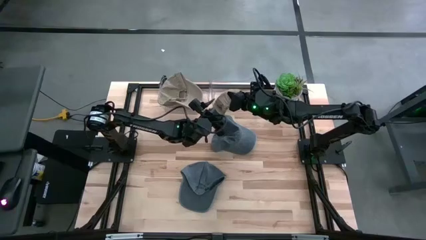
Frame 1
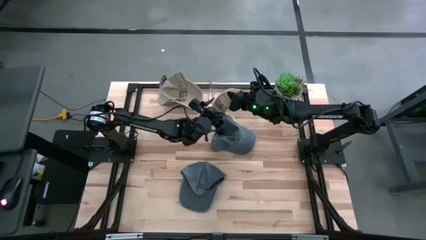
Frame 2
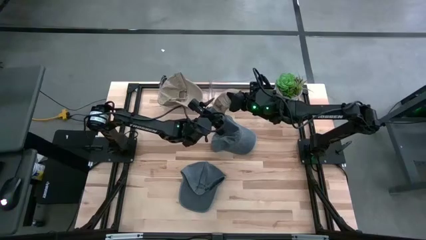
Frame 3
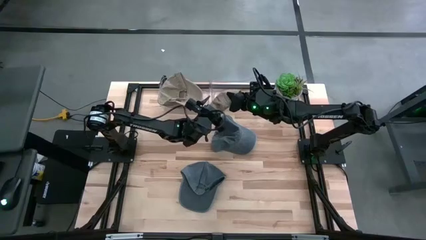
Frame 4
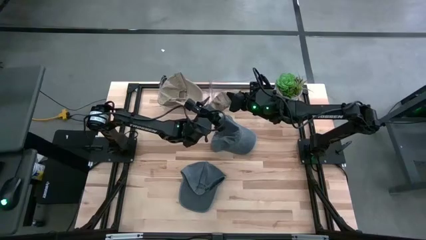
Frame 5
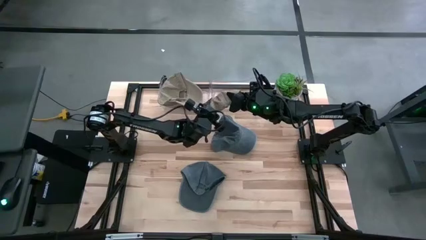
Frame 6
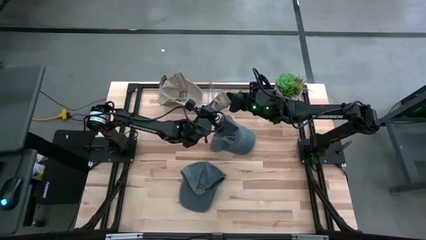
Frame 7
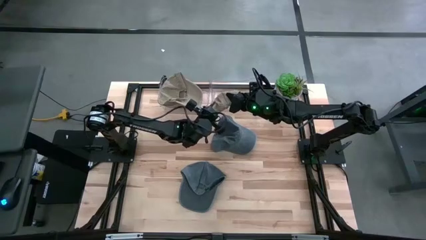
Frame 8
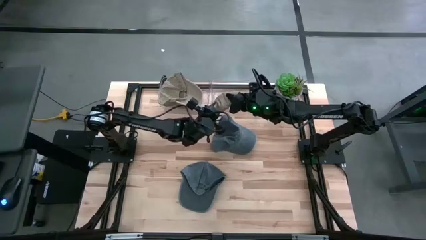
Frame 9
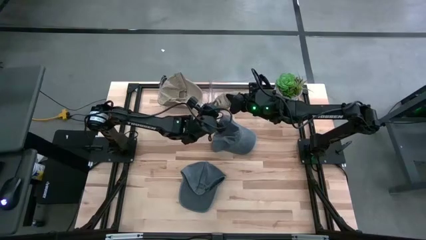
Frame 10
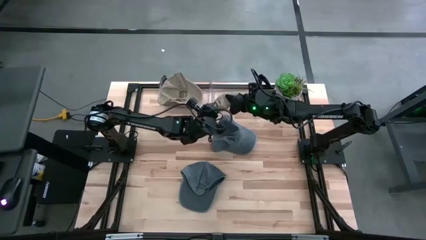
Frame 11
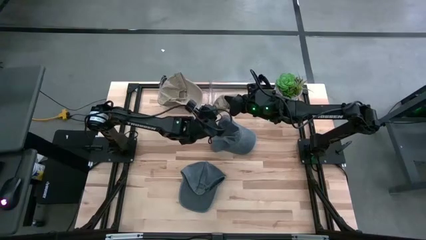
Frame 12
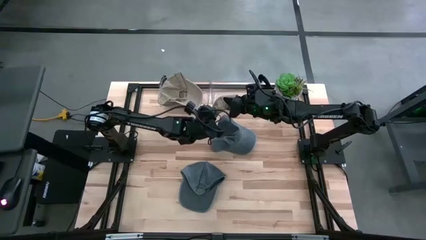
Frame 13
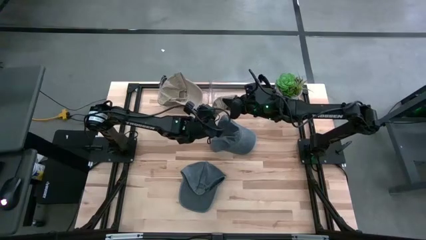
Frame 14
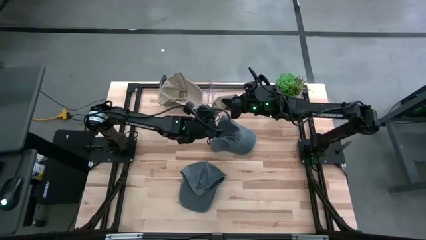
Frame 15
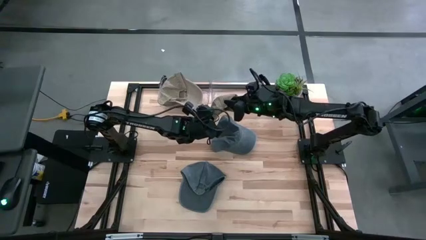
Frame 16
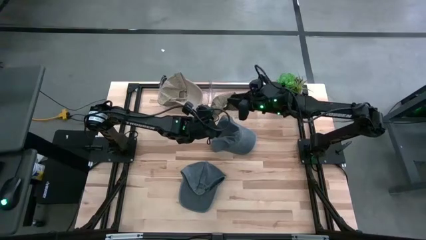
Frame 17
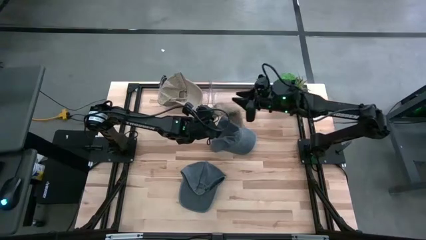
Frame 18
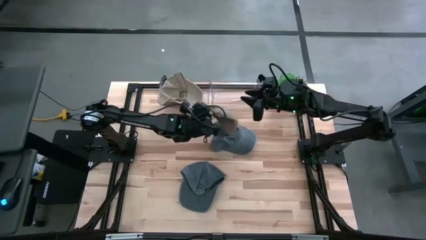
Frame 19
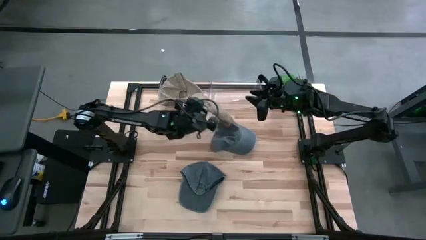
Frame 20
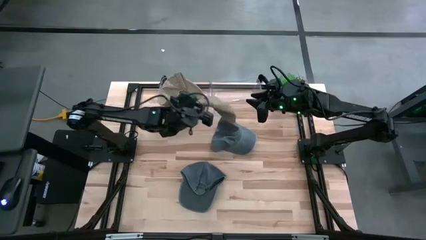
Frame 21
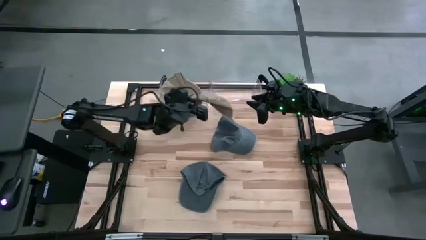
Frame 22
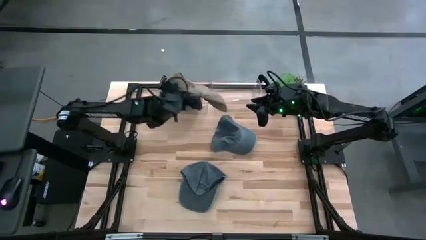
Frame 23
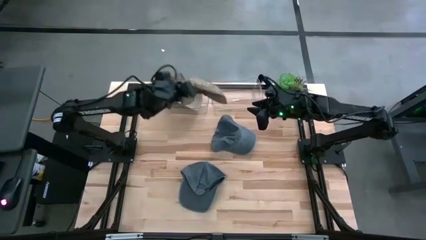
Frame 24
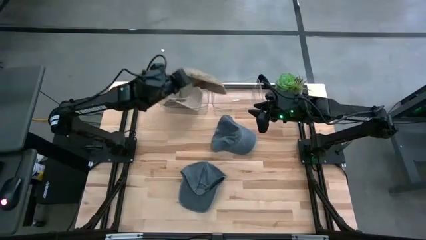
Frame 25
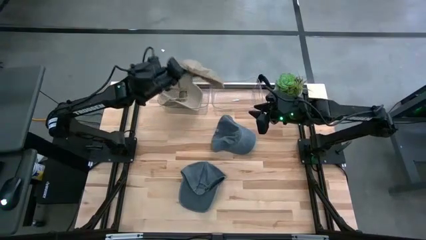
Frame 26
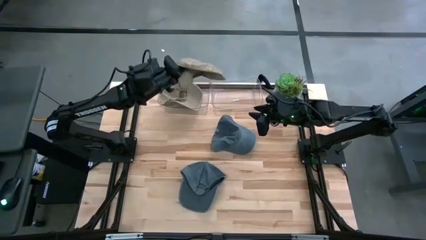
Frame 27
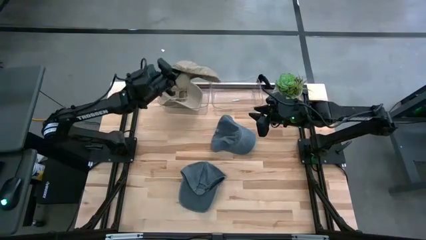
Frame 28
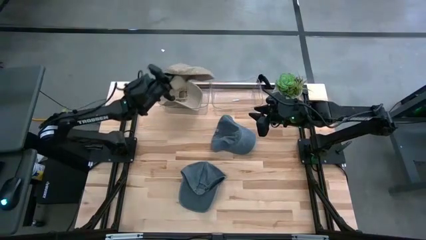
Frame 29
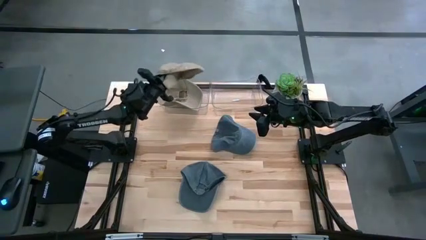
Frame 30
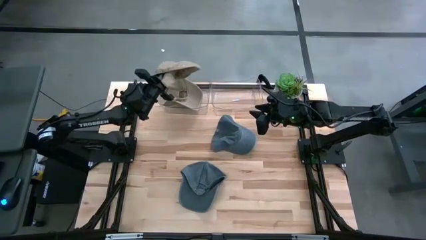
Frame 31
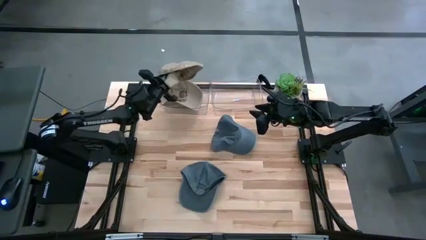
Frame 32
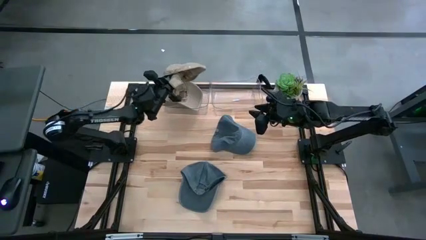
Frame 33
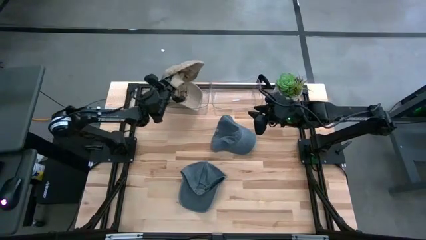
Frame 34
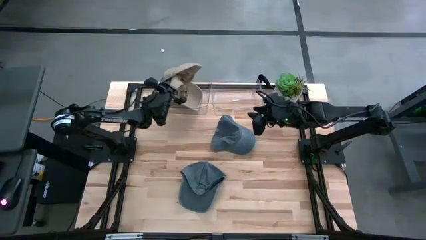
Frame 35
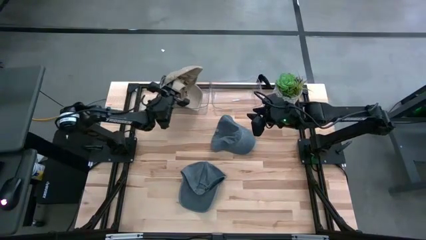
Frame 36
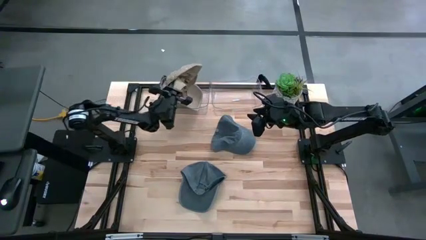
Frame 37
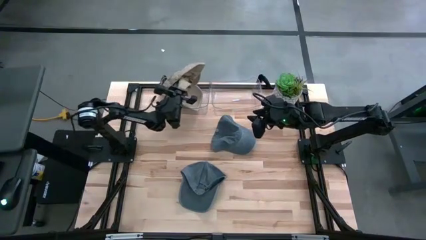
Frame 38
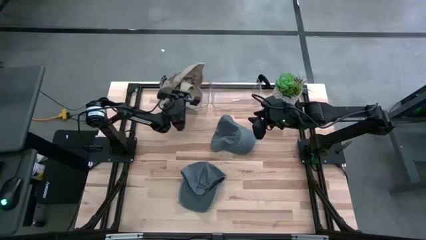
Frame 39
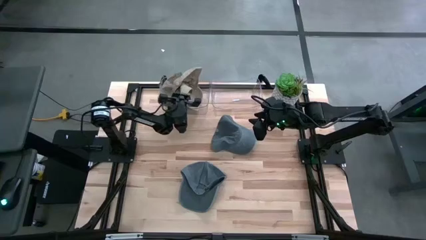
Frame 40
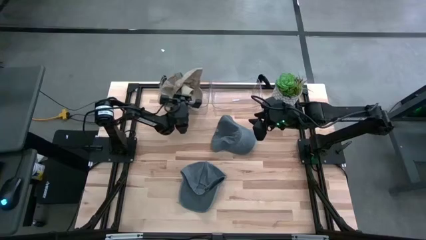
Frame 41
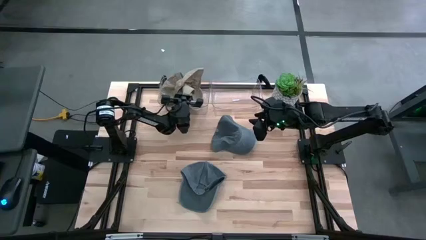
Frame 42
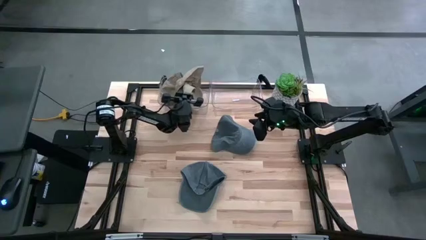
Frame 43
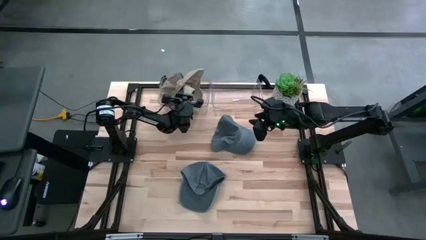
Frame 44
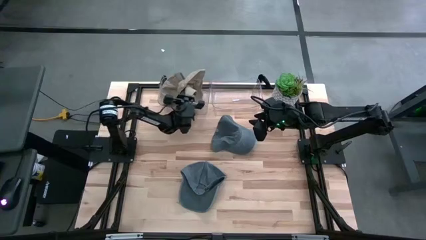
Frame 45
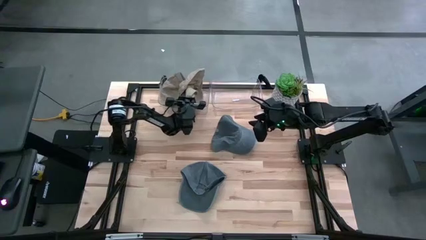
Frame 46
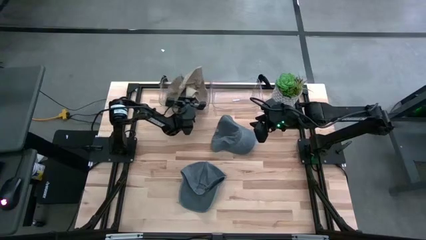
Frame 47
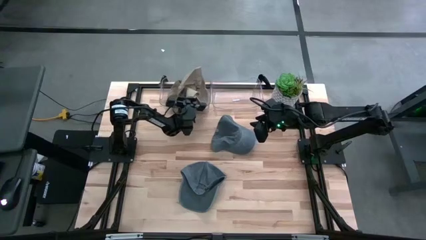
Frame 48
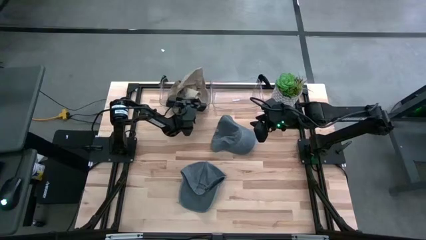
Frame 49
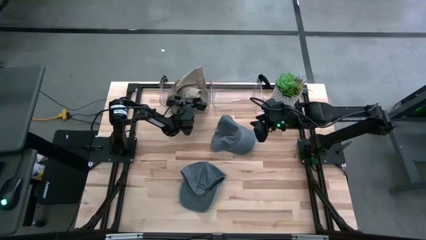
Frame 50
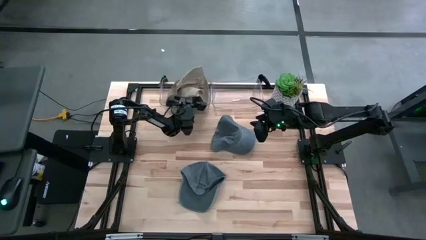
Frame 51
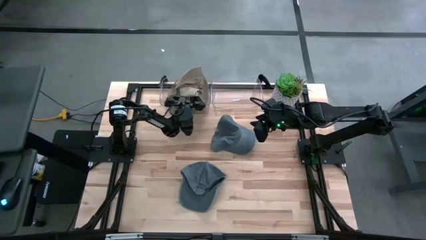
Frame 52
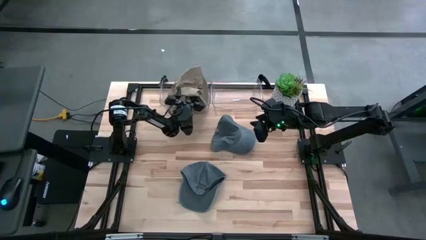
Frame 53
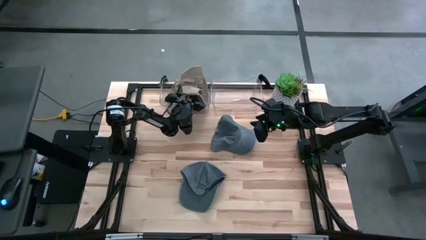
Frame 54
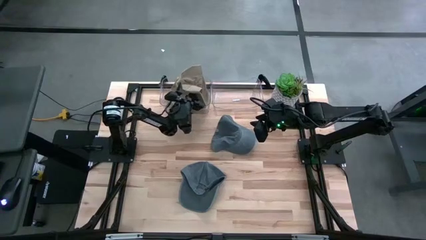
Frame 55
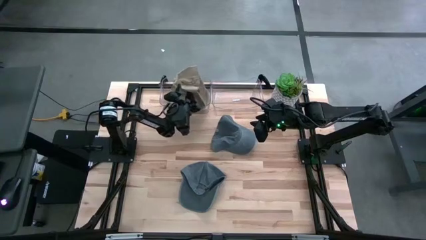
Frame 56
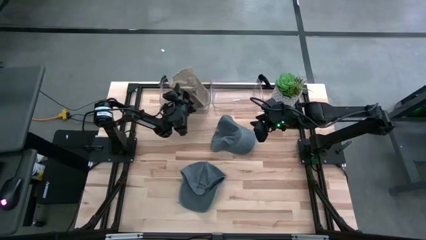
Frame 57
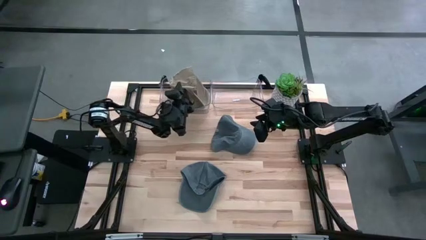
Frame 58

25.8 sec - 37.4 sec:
Task: Pick & Place hat
Put the brown cap into the left transparent bin

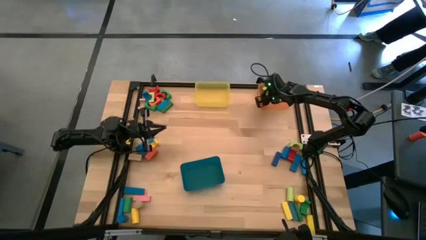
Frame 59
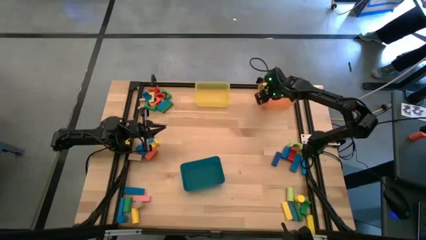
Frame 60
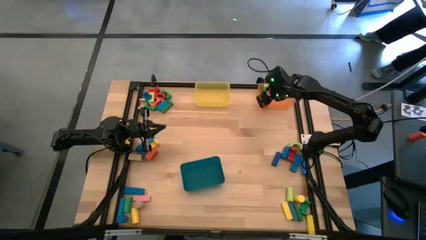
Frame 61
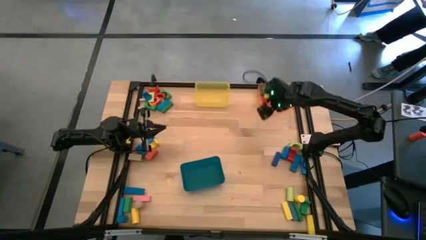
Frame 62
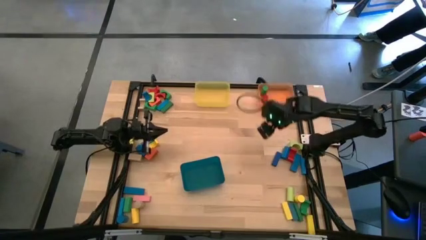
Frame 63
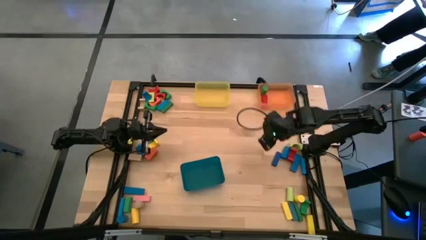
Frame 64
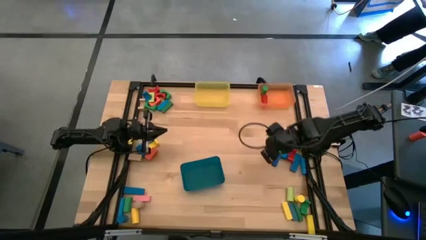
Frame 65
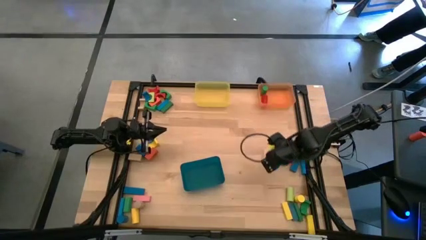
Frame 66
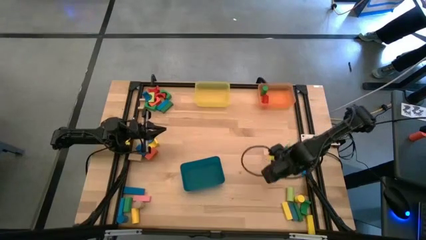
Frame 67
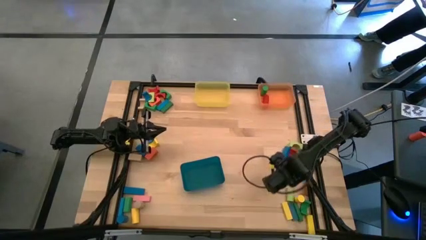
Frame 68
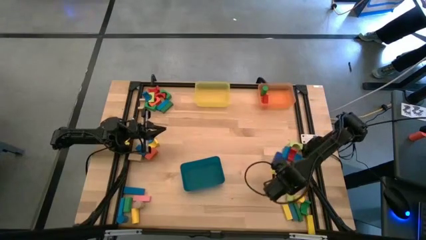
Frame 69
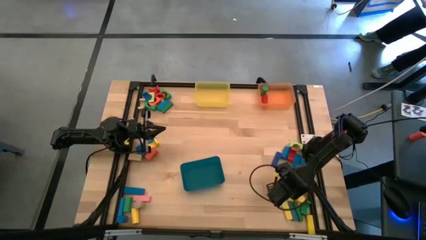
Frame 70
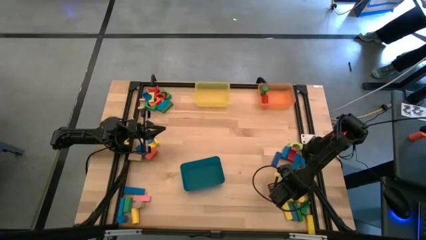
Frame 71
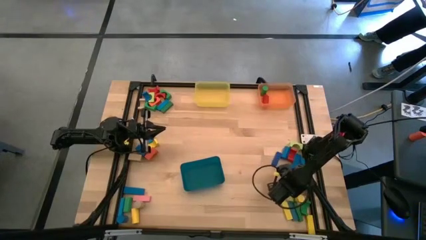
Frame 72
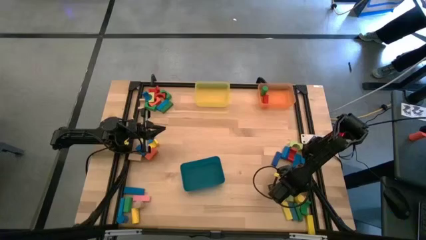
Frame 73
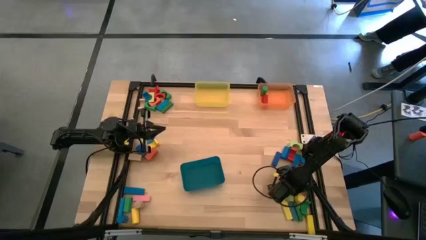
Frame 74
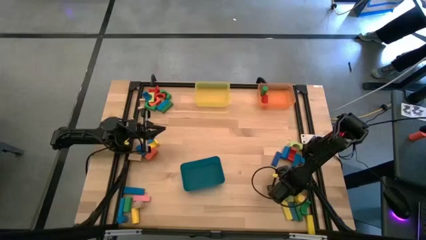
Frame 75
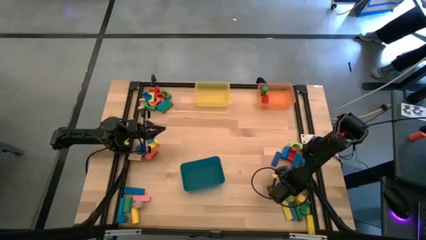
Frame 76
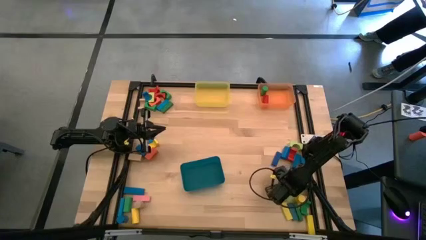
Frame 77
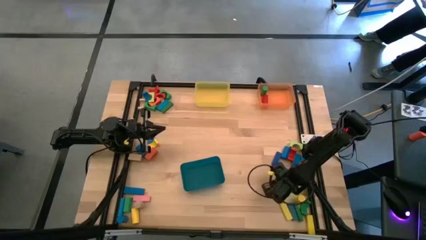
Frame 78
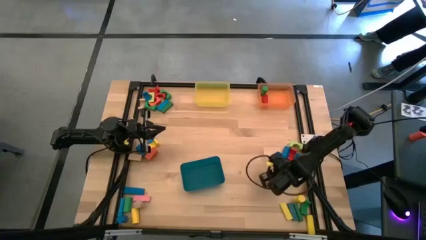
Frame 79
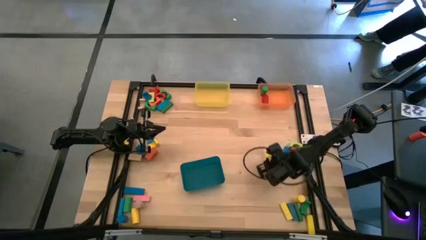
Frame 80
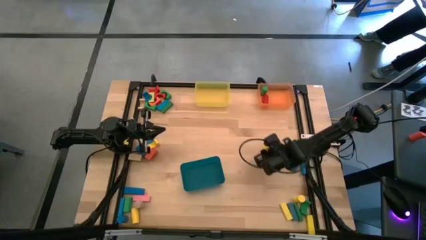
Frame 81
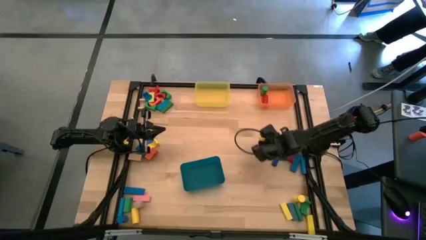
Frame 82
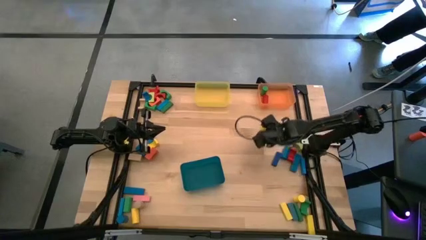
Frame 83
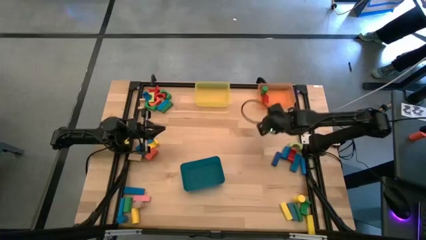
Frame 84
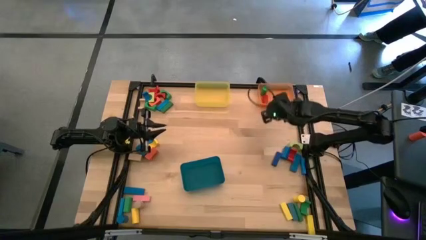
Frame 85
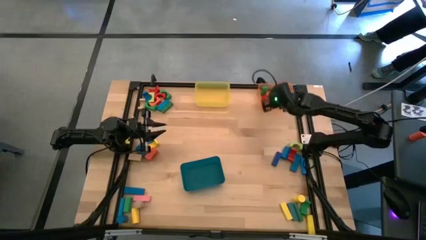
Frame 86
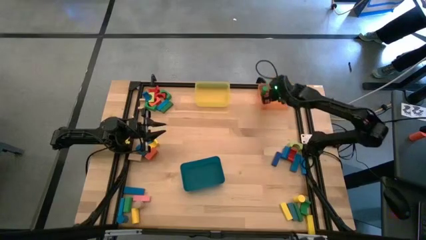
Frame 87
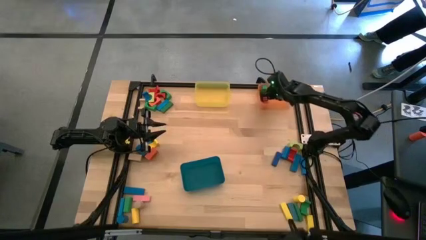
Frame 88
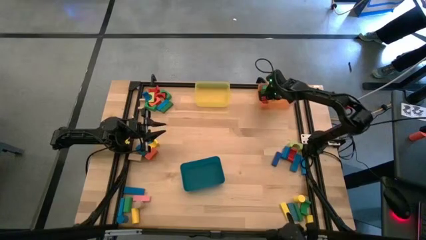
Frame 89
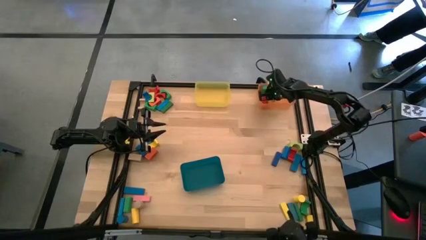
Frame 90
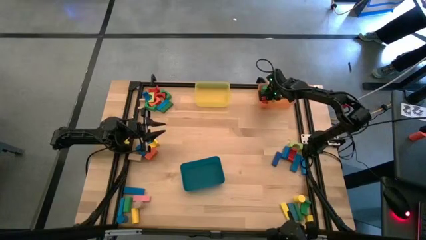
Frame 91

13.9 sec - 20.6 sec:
Task: Sort blocks by size
Put the light green cylindrical block into the orange bin
